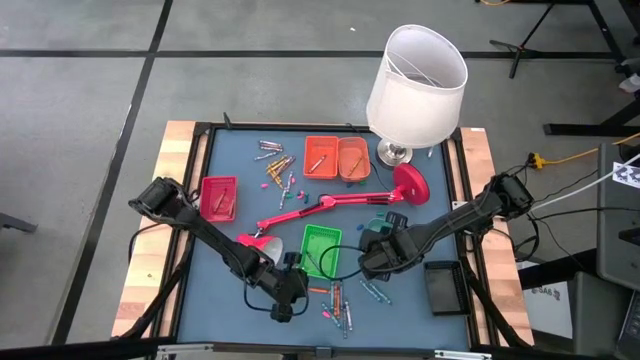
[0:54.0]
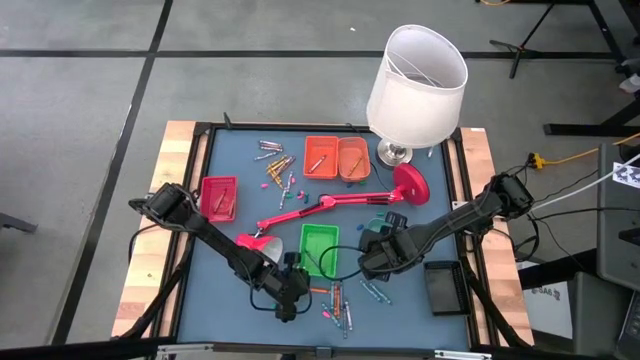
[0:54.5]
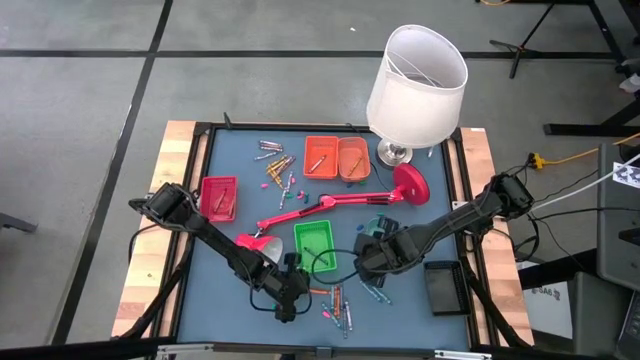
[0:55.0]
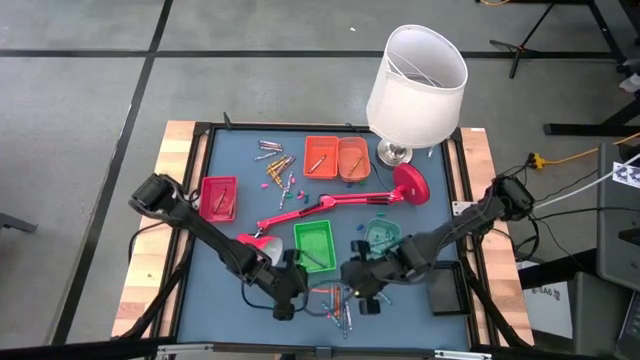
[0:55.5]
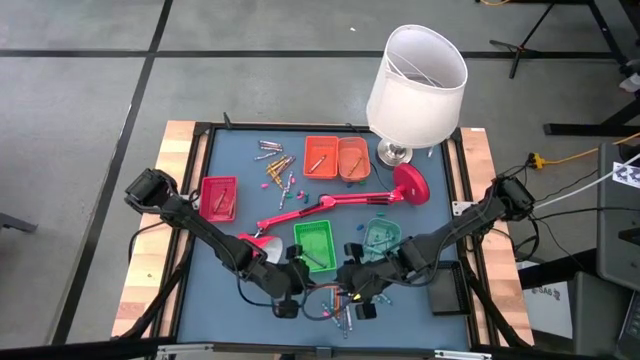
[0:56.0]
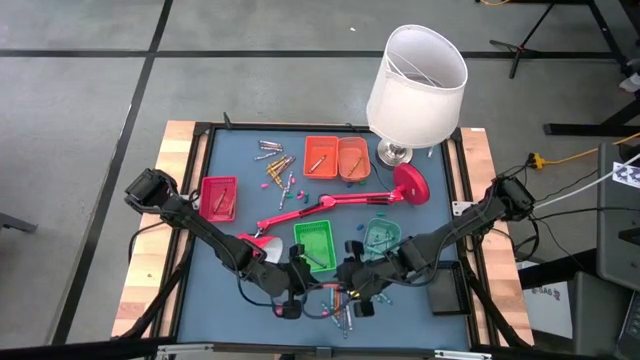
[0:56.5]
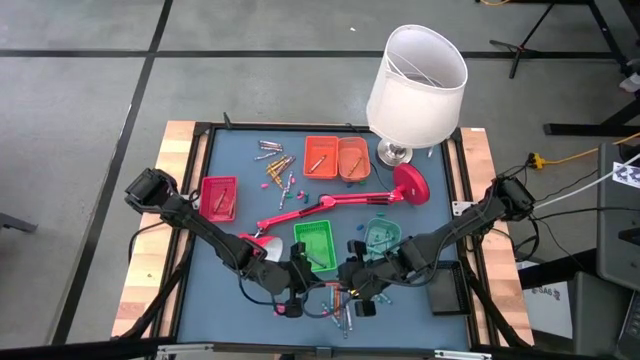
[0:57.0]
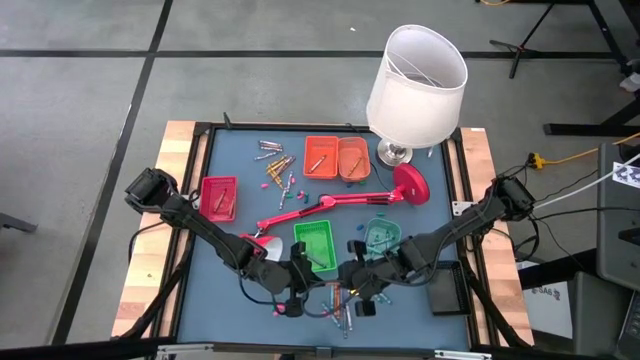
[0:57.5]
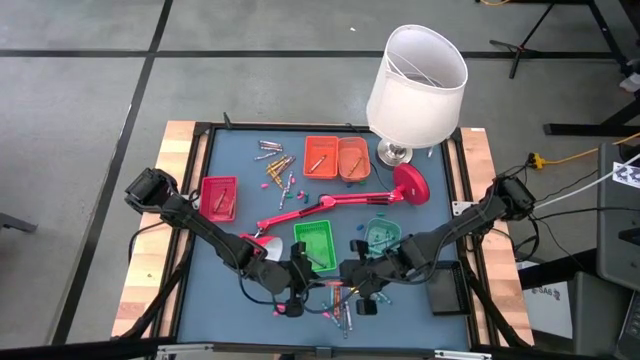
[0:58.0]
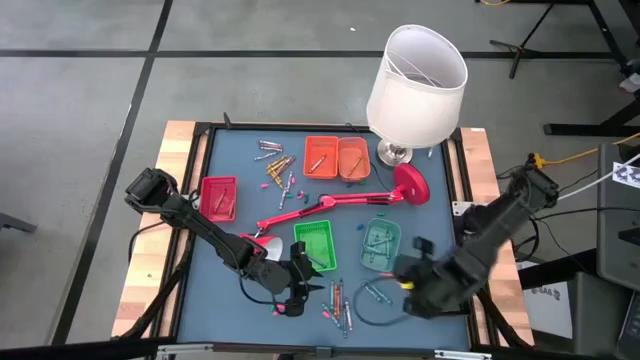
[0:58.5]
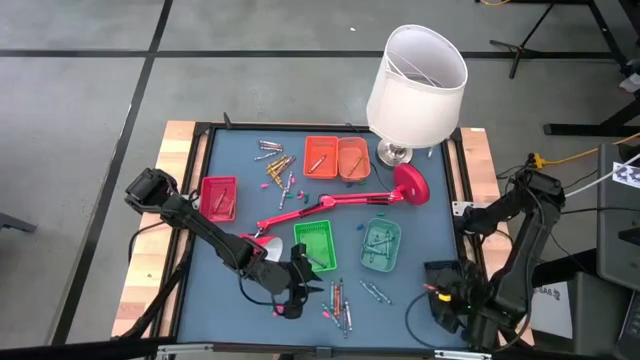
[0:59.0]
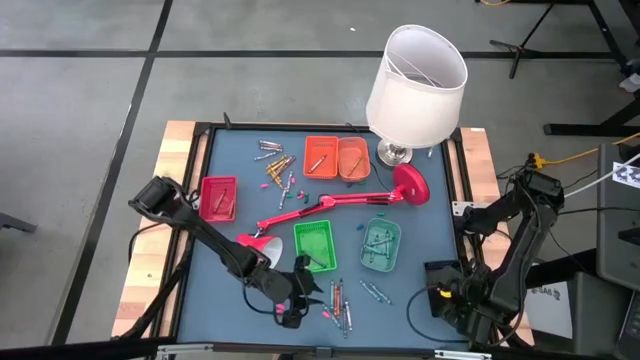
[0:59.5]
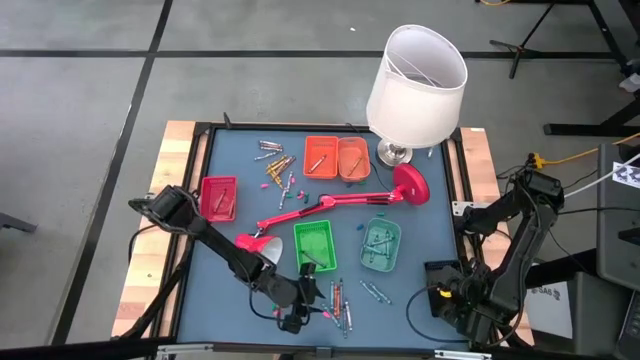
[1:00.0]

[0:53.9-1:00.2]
Task: Sort crayons
Put the orange crayon into the black bin

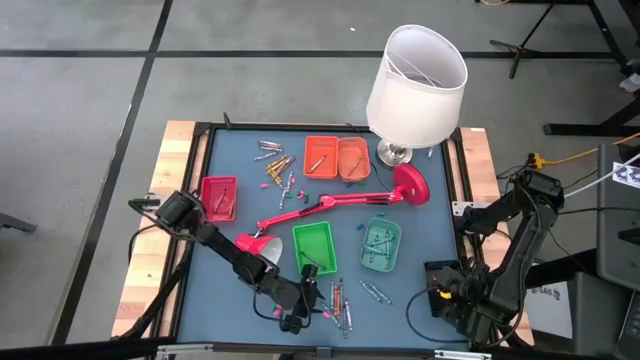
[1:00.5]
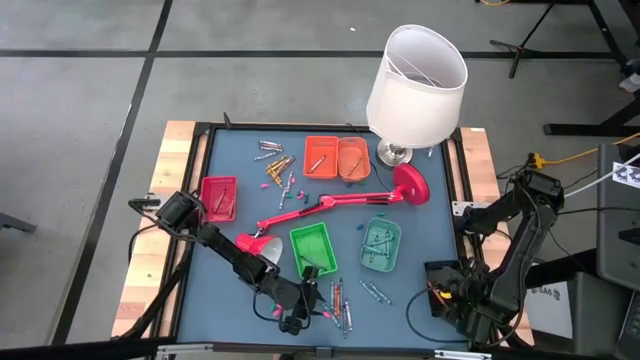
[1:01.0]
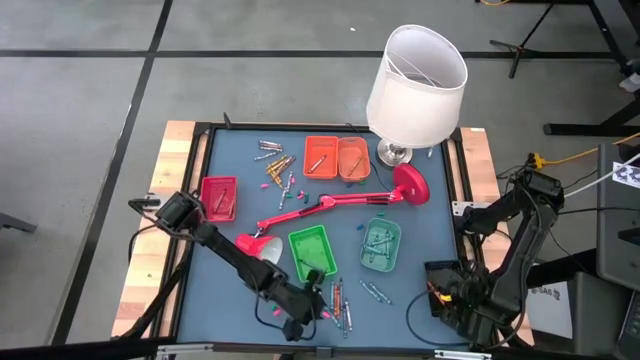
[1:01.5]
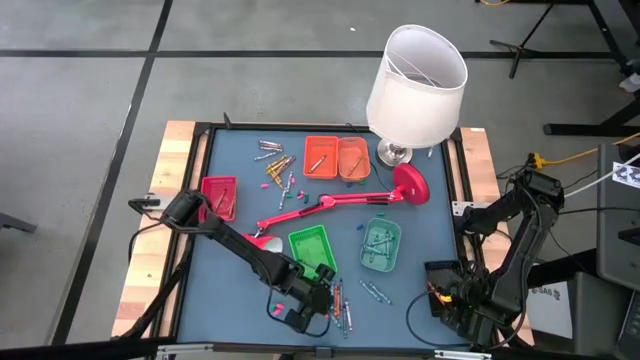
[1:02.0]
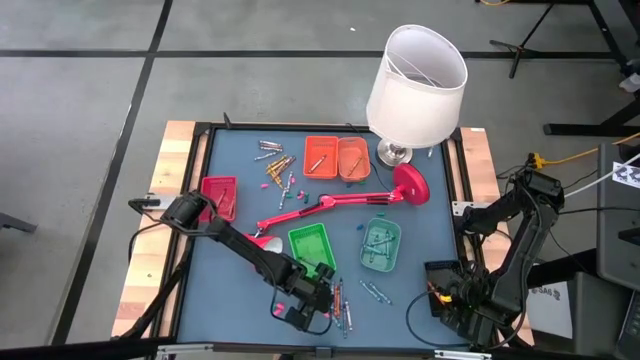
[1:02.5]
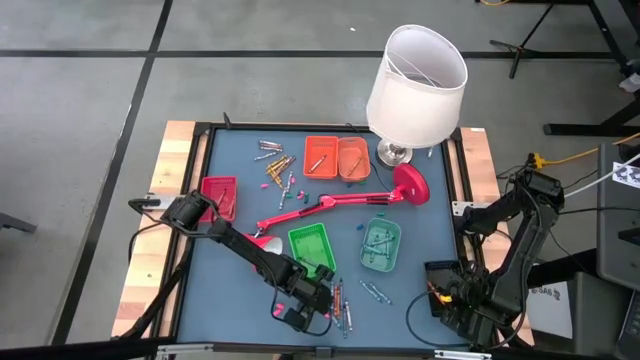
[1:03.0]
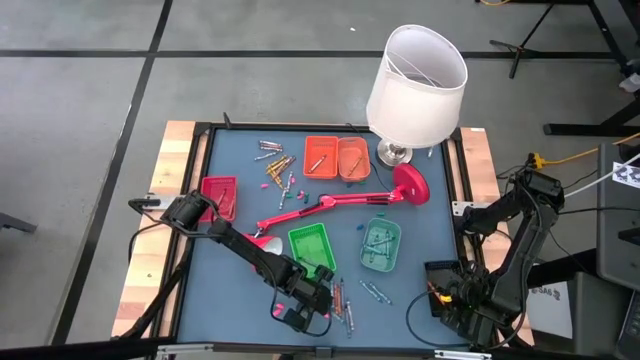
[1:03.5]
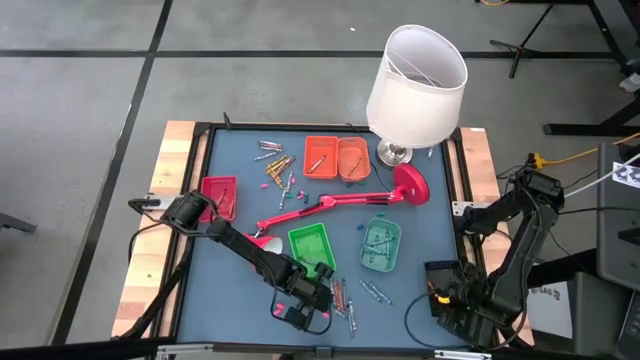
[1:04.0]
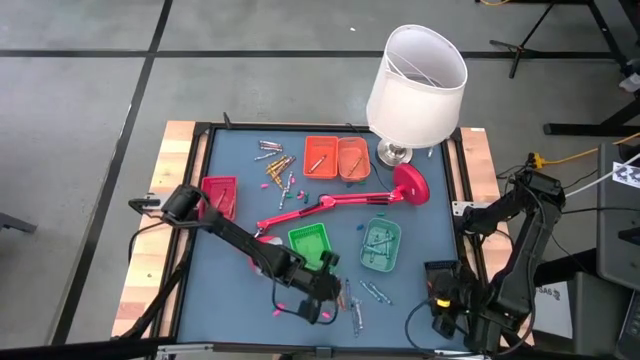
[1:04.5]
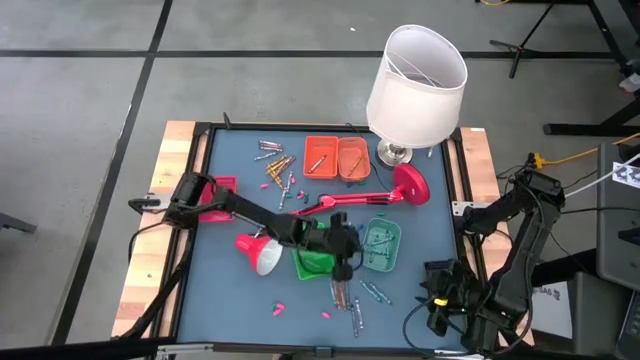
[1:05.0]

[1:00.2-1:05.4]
Put the green crayon into the light green bin

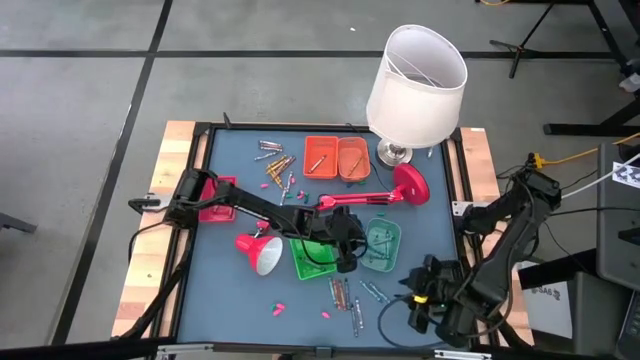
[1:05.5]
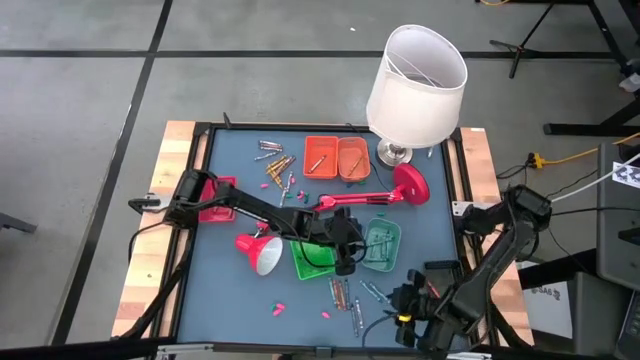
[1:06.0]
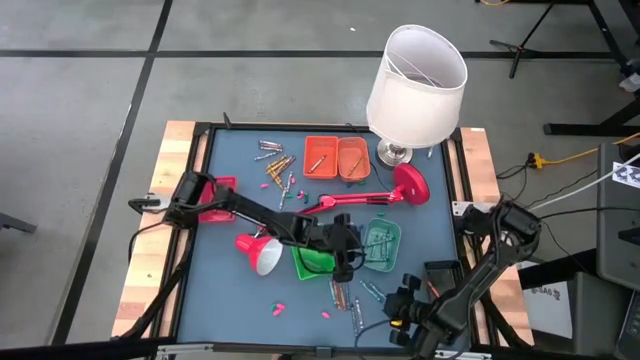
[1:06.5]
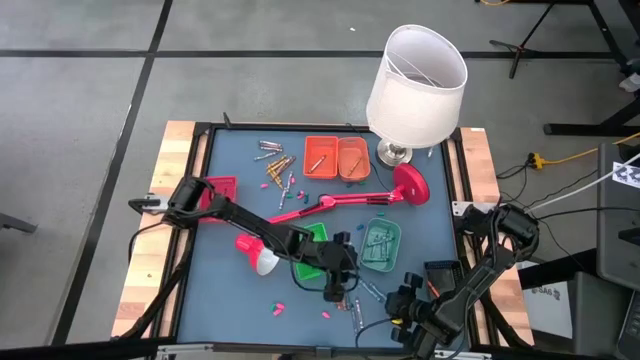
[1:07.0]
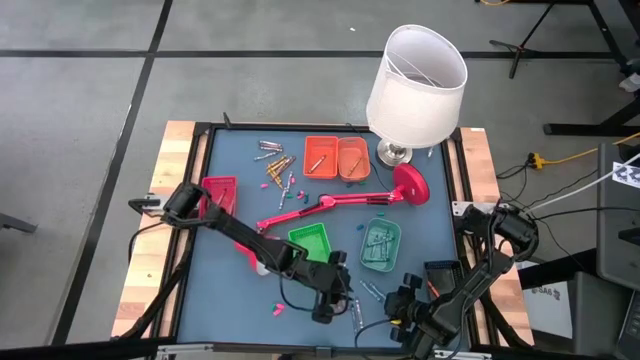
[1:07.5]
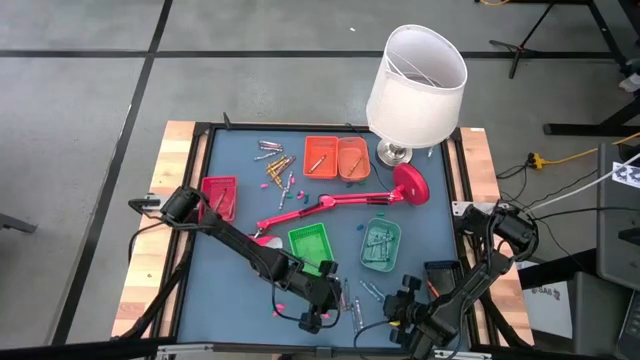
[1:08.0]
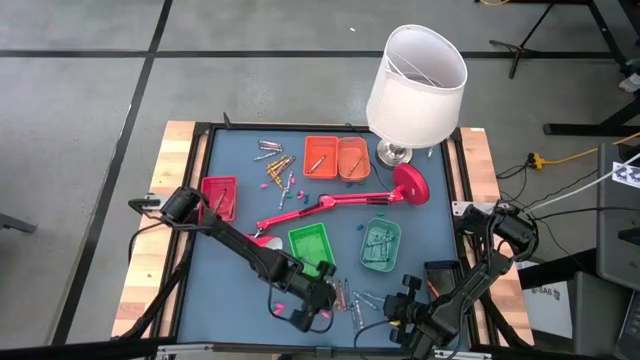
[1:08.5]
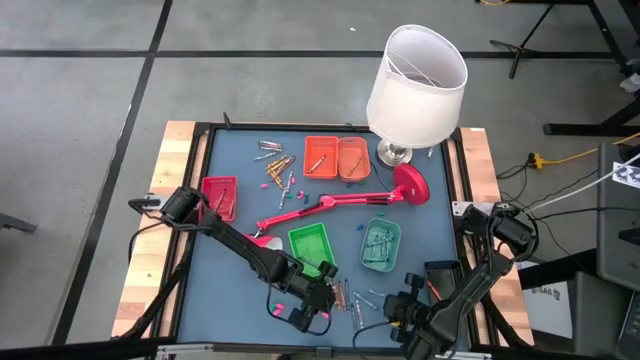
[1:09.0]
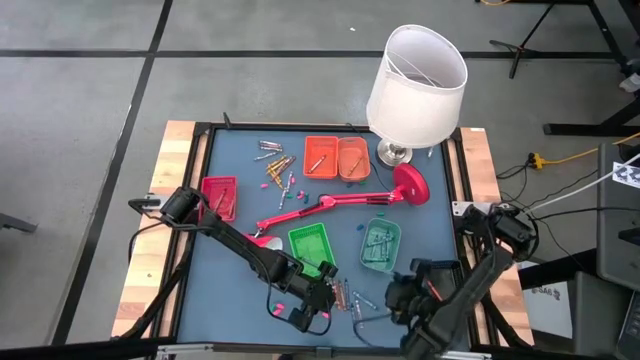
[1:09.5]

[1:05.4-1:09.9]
Put the green crayon into the light green bin

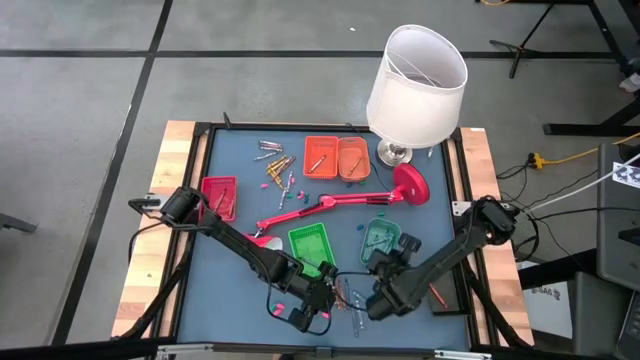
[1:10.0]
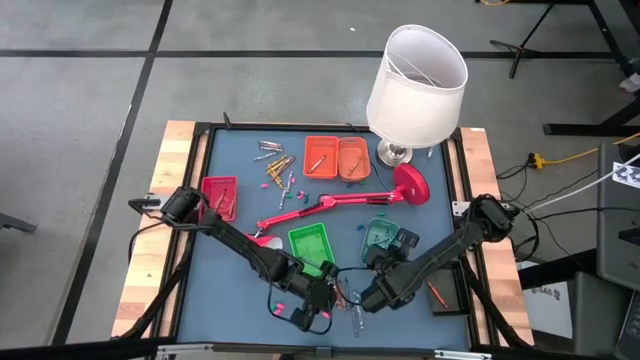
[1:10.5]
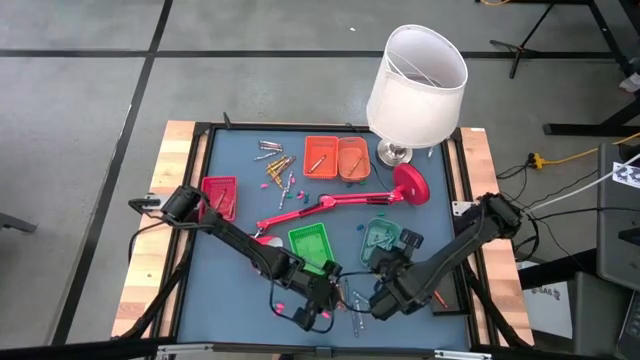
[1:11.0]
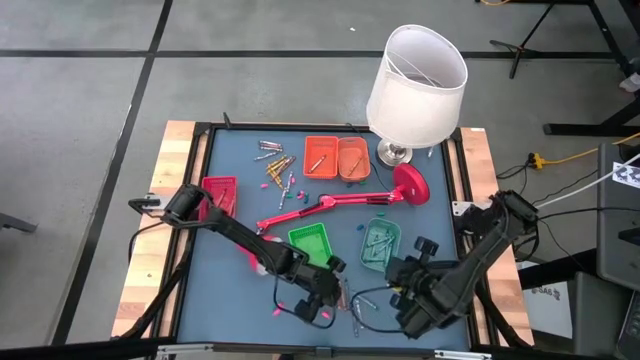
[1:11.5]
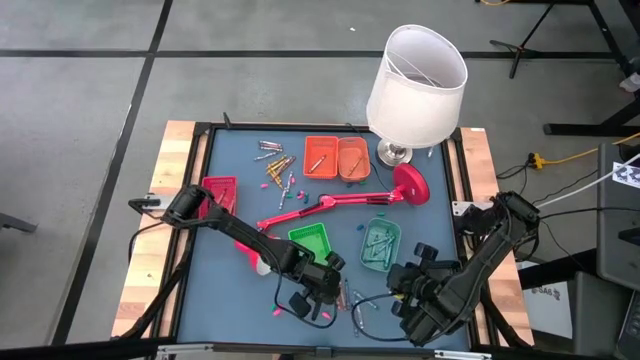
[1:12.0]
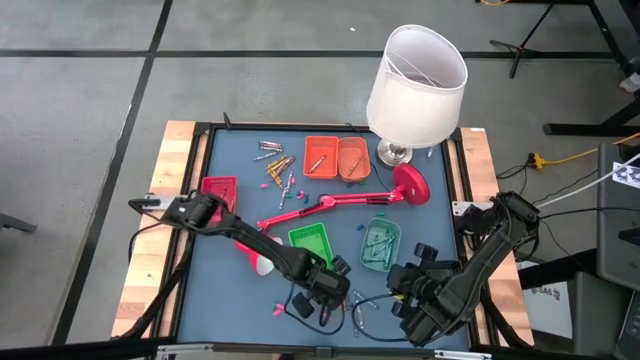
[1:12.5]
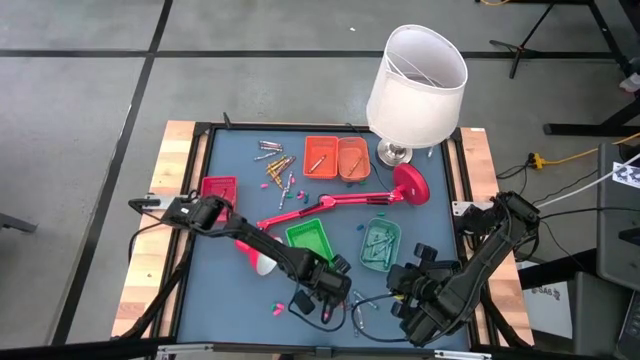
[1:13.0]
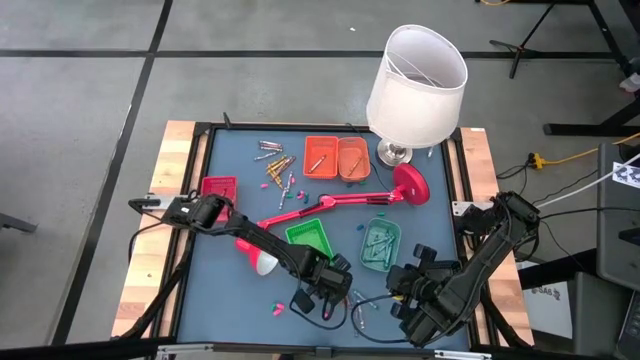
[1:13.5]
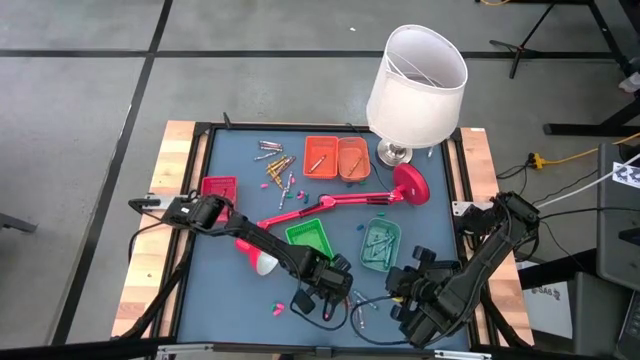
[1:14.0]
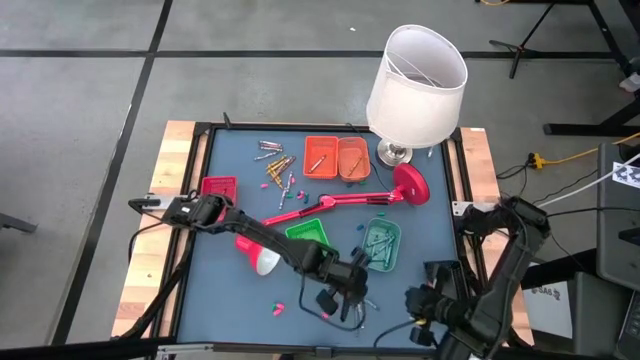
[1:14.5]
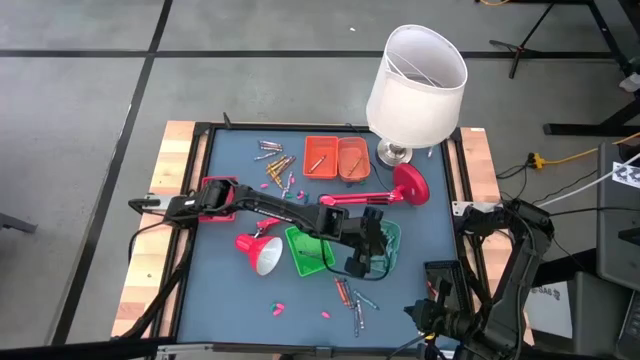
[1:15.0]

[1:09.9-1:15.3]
Put the green crayon into the light green bin
